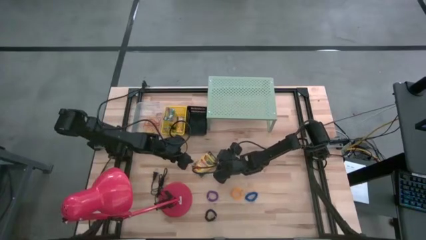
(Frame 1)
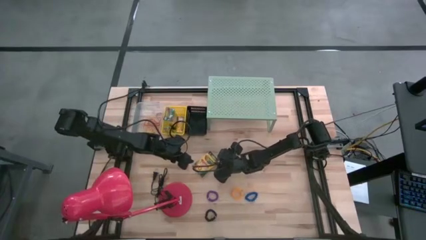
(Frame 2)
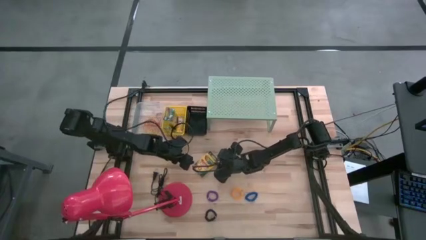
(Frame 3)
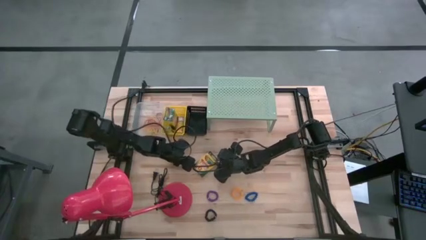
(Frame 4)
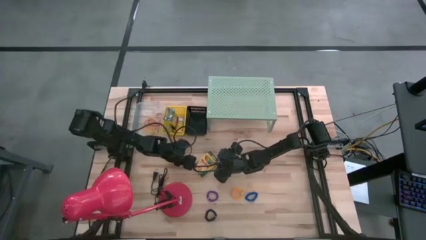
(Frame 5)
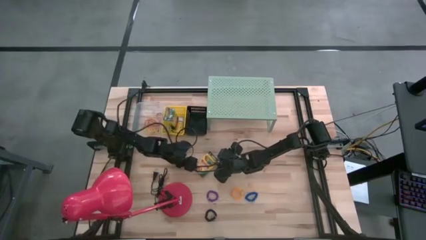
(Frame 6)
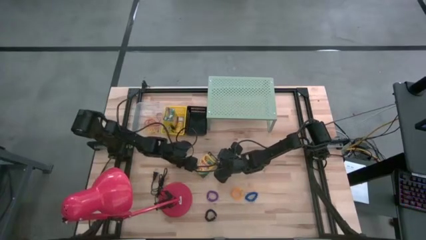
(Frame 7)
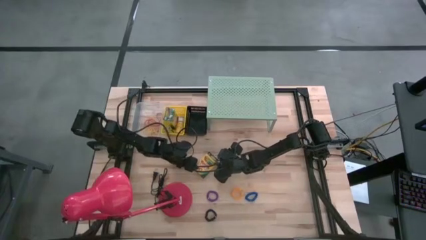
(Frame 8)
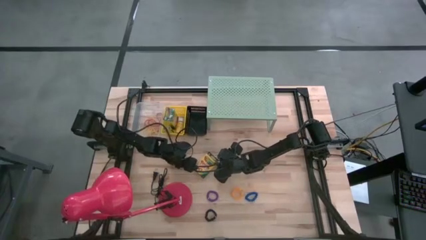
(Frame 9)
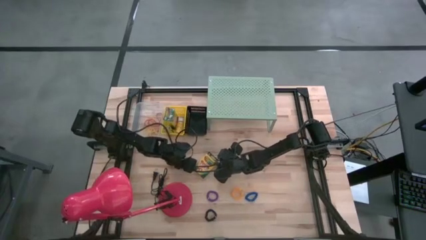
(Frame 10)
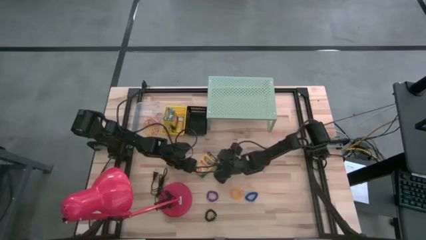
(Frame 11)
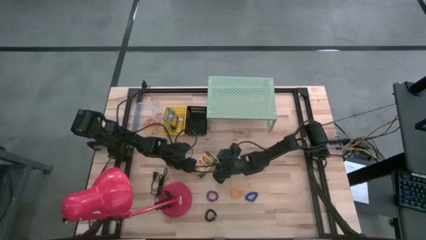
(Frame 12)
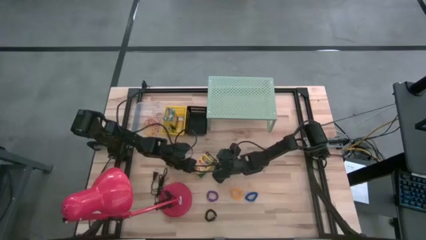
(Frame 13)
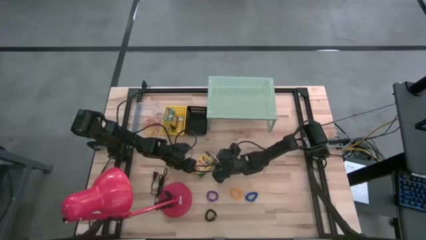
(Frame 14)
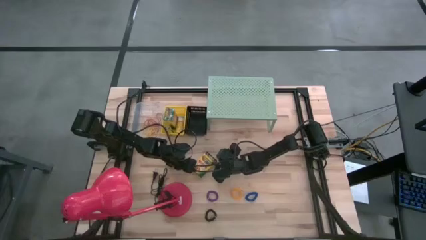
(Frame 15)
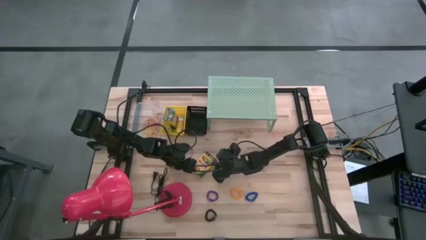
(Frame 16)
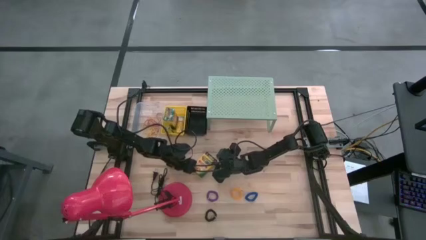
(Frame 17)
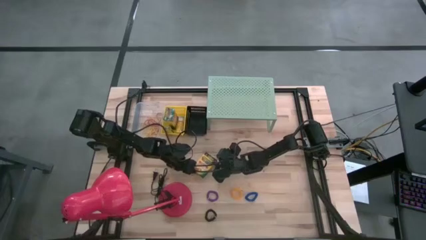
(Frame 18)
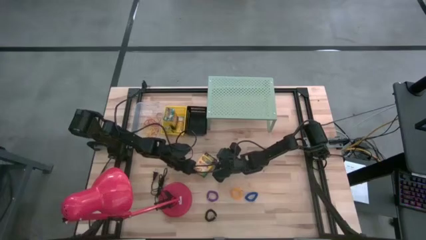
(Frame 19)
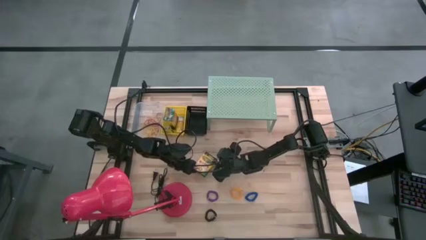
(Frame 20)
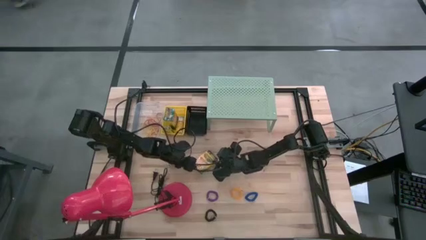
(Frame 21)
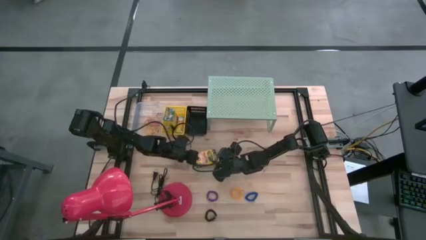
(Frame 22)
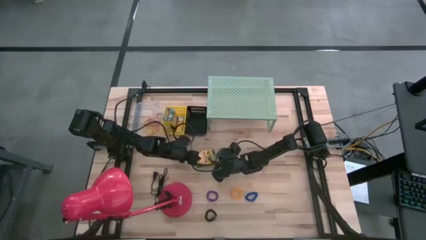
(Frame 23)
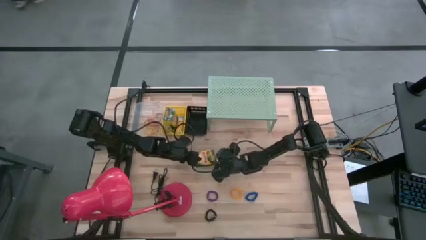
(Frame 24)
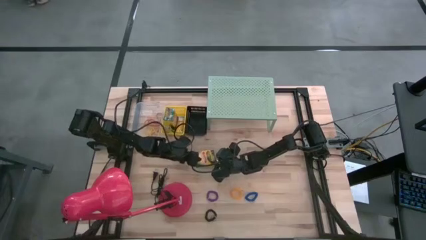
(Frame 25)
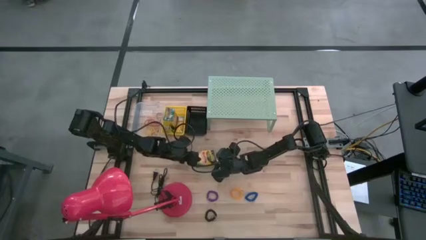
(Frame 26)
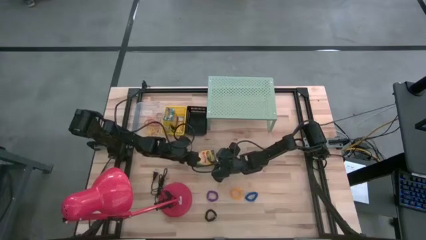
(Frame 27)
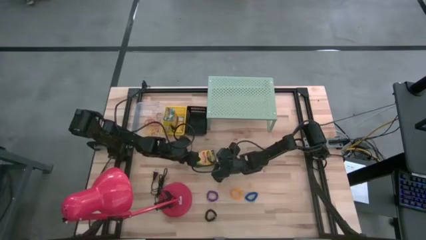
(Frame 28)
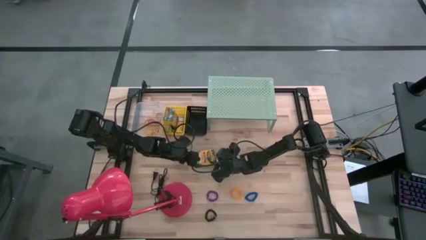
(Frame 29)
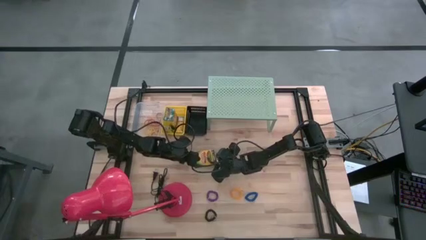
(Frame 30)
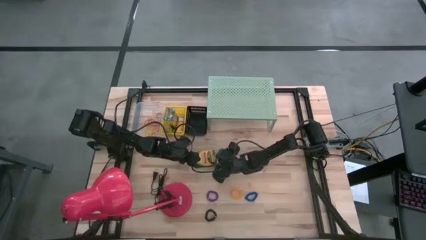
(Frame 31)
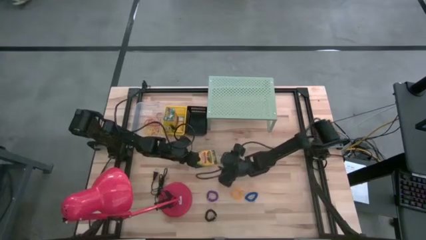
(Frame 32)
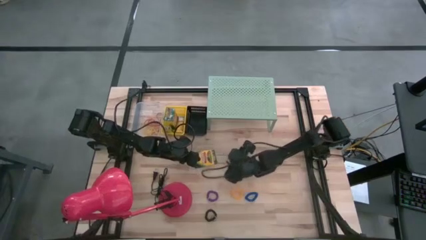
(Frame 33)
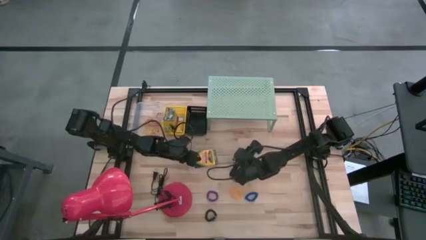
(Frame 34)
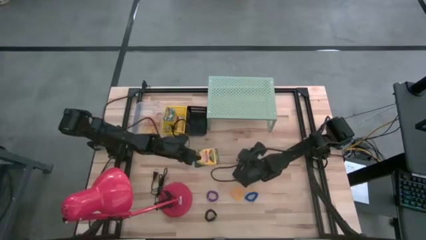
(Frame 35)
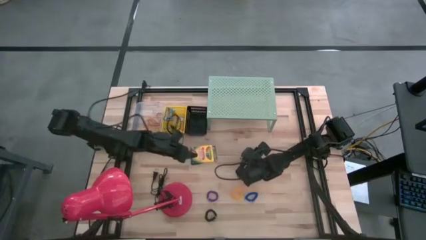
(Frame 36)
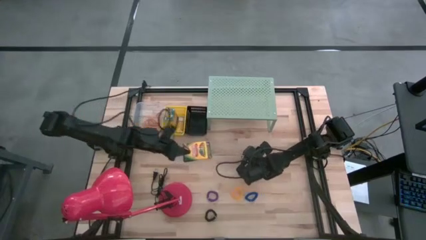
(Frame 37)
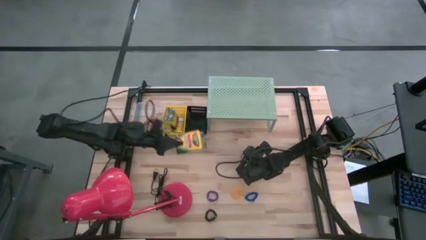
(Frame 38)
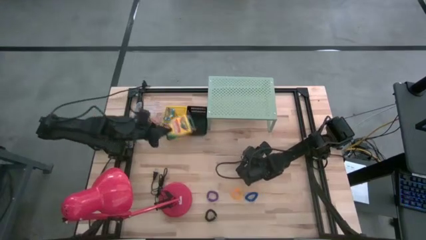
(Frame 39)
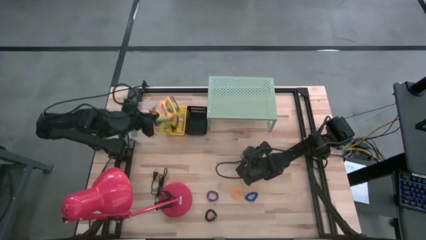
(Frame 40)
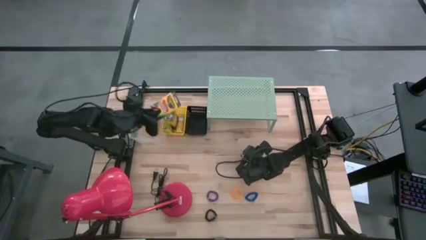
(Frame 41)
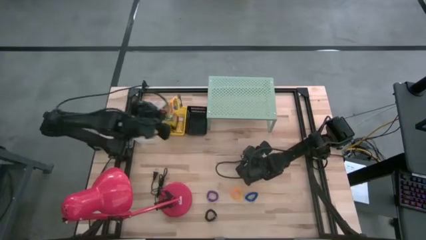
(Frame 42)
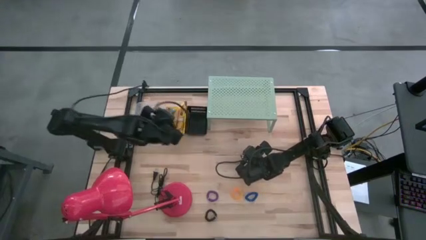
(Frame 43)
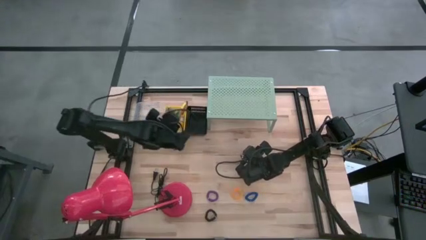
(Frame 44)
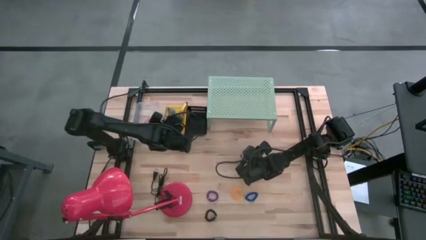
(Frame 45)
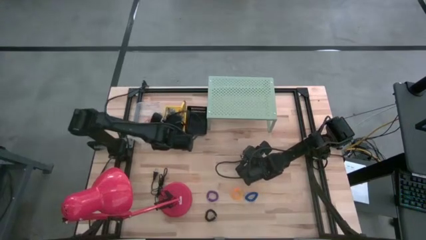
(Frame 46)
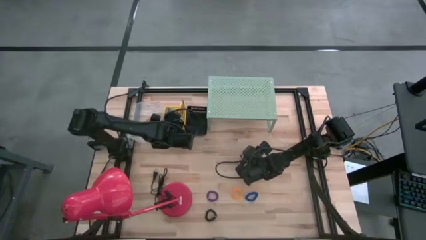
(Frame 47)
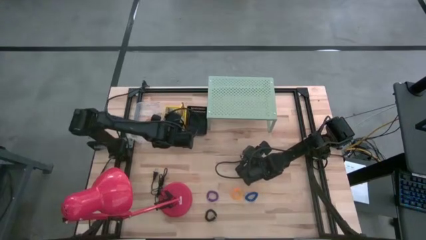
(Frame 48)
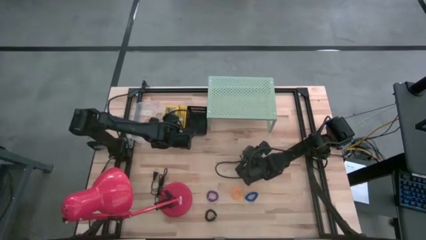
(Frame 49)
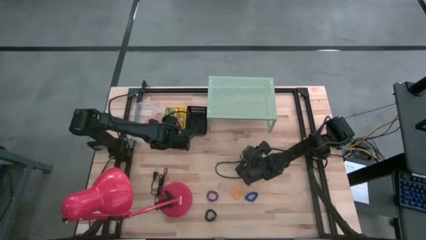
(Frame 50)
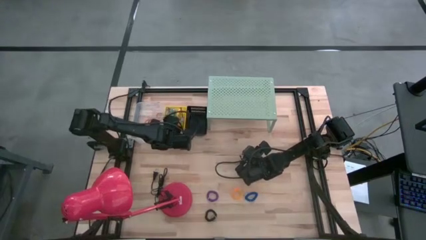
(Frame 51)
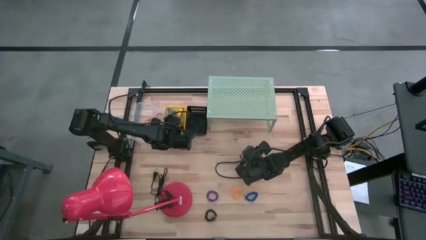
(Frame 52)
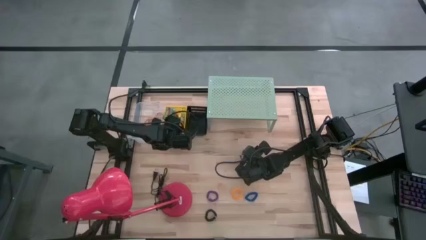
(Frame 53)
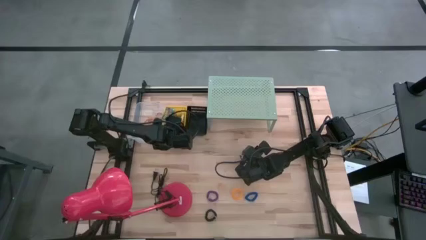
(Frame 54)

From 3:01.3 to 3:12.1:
Task: Pick & Place Office Desk Supplies
Put the crayon into the yellow bin
